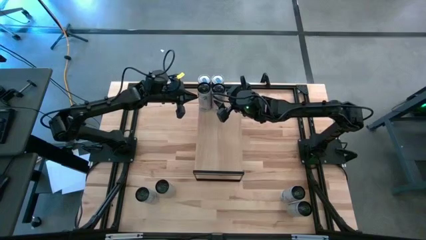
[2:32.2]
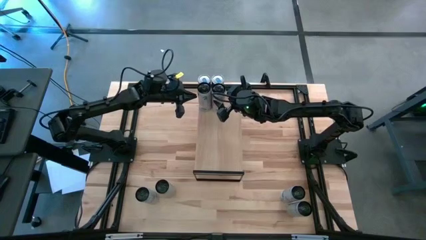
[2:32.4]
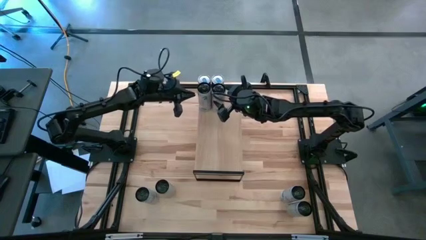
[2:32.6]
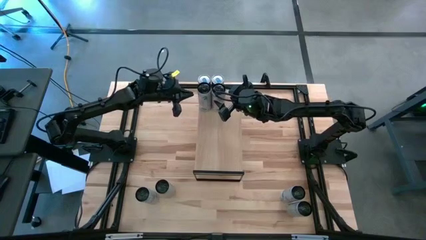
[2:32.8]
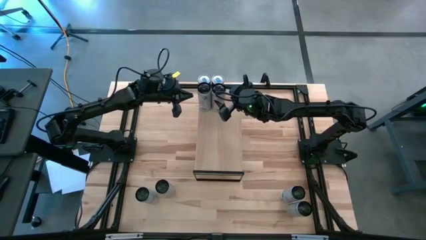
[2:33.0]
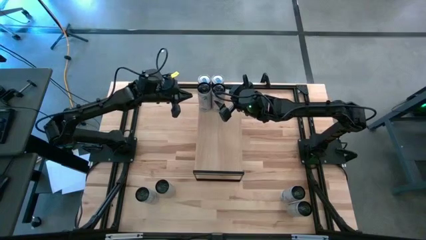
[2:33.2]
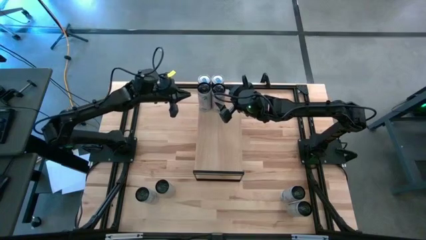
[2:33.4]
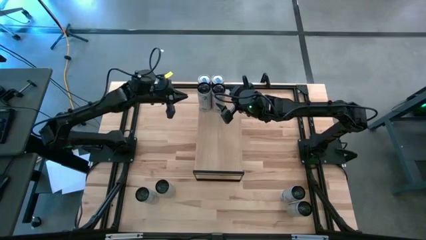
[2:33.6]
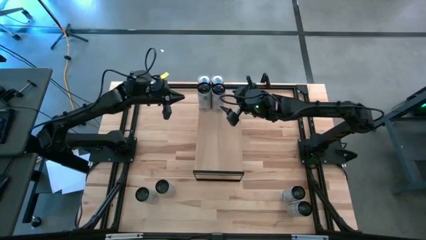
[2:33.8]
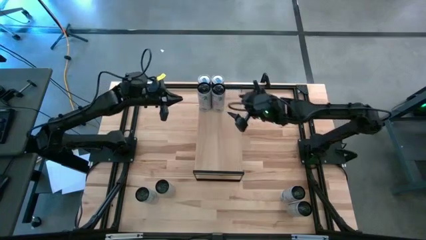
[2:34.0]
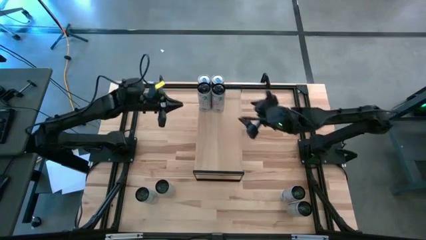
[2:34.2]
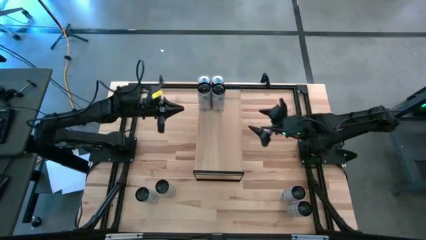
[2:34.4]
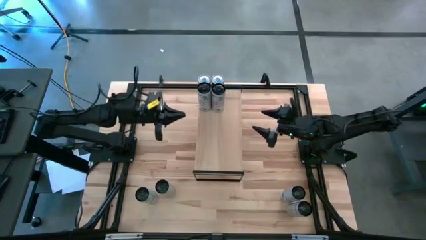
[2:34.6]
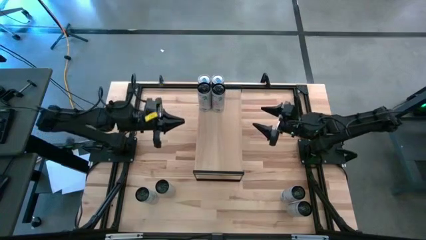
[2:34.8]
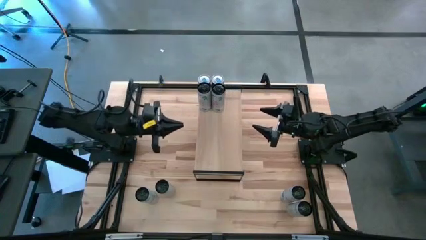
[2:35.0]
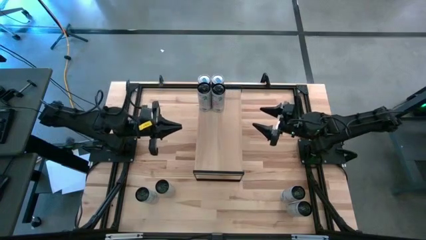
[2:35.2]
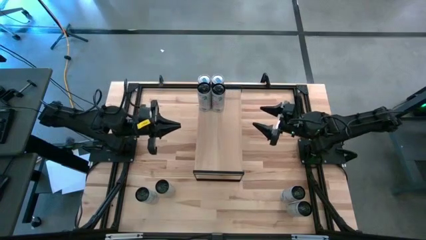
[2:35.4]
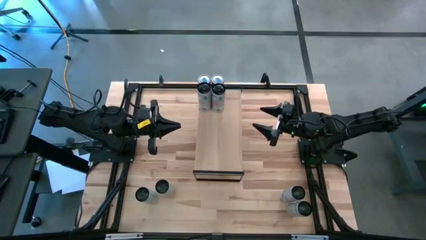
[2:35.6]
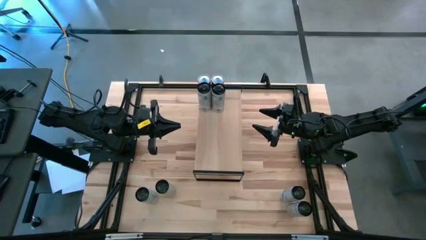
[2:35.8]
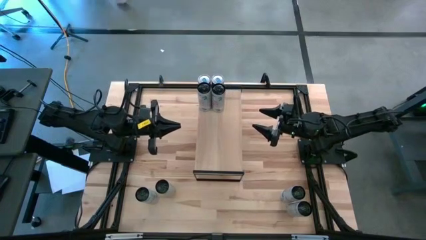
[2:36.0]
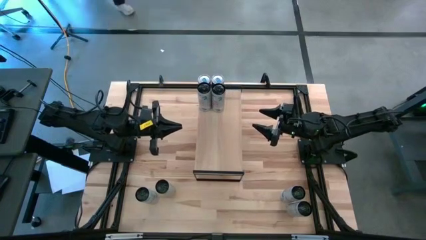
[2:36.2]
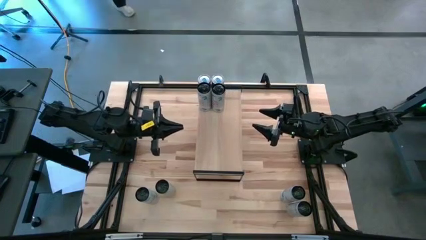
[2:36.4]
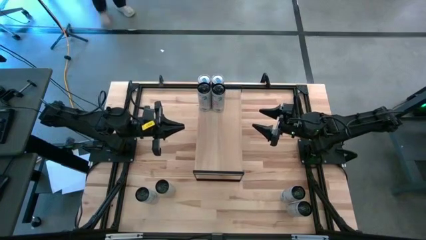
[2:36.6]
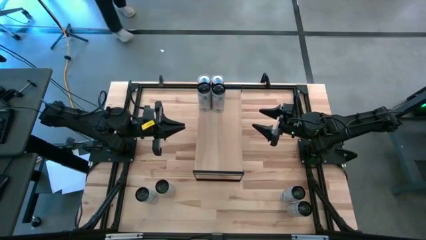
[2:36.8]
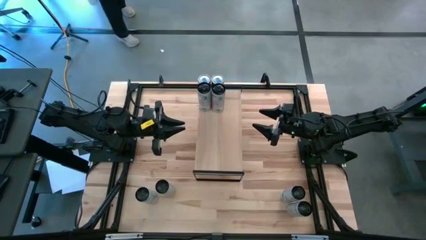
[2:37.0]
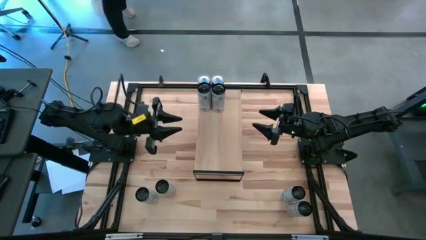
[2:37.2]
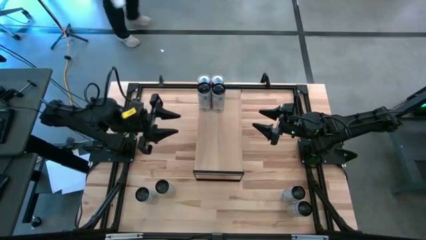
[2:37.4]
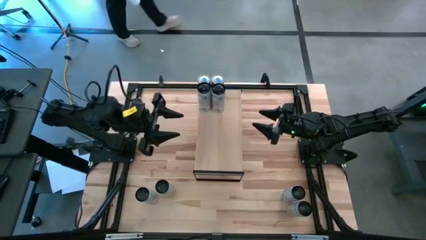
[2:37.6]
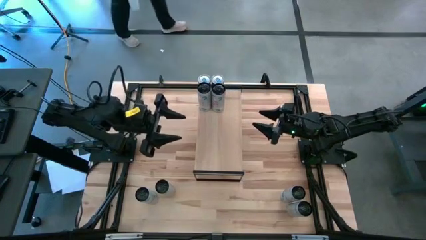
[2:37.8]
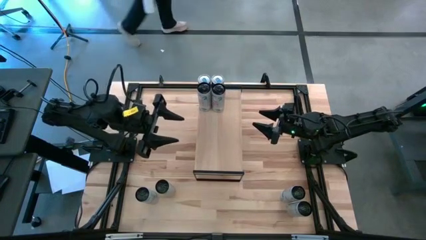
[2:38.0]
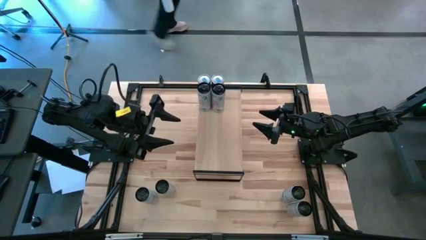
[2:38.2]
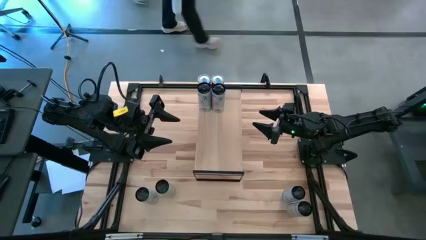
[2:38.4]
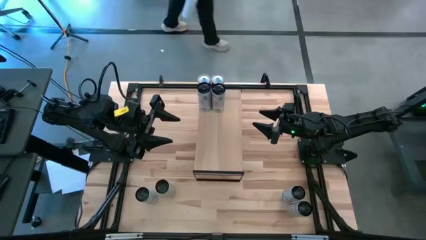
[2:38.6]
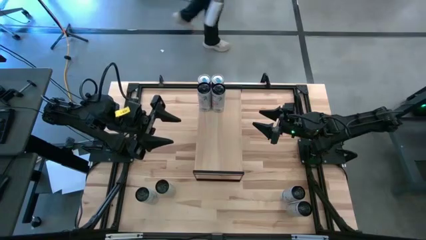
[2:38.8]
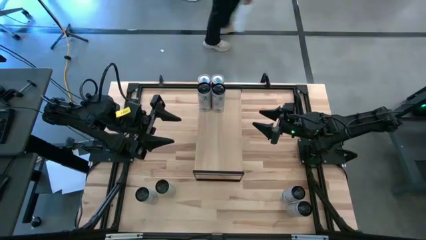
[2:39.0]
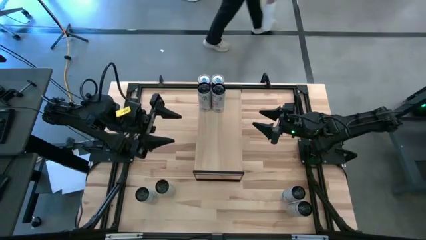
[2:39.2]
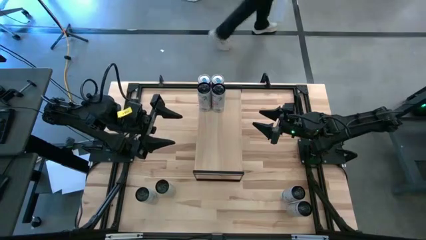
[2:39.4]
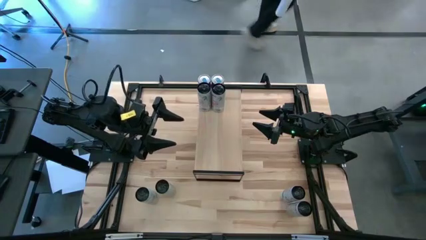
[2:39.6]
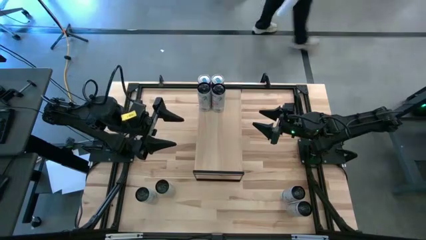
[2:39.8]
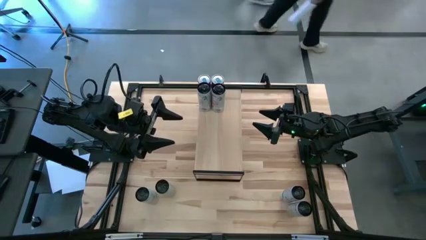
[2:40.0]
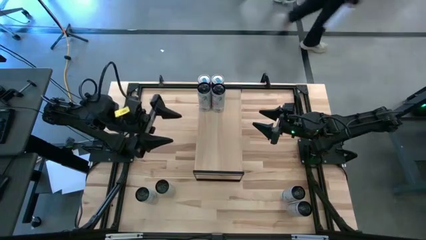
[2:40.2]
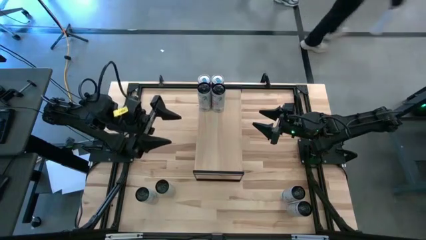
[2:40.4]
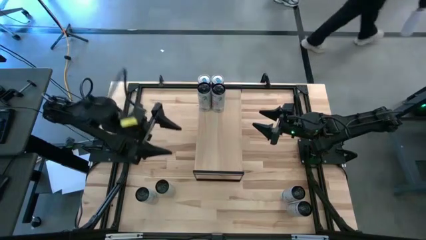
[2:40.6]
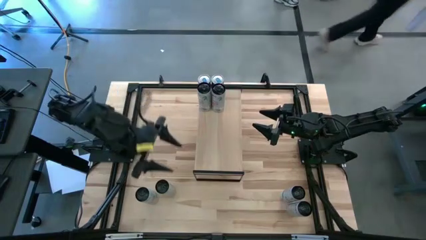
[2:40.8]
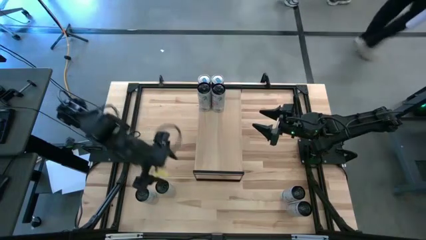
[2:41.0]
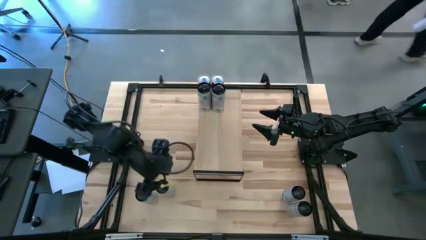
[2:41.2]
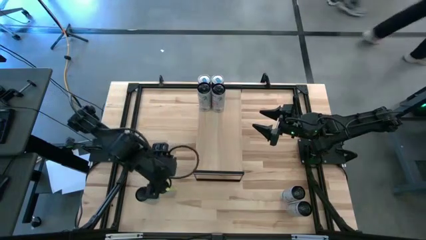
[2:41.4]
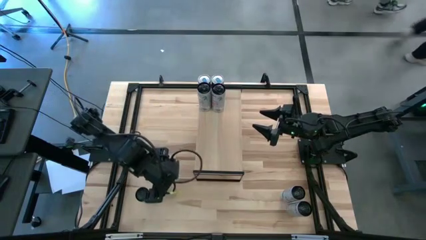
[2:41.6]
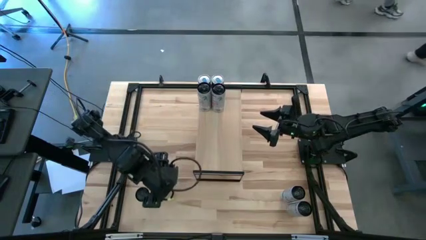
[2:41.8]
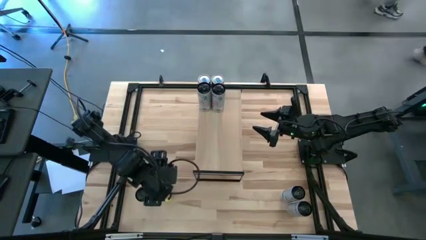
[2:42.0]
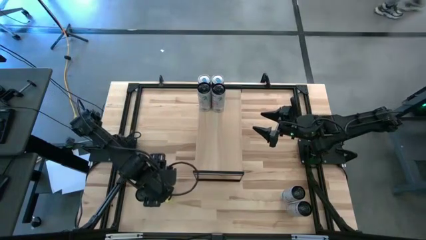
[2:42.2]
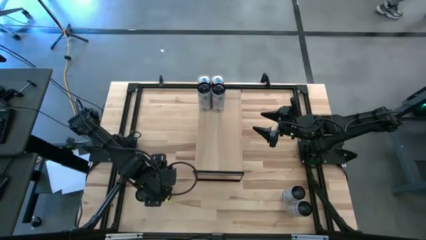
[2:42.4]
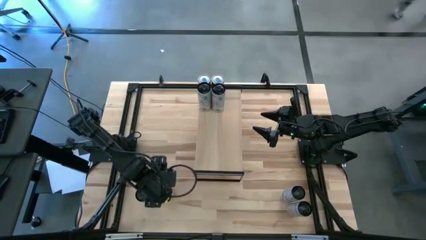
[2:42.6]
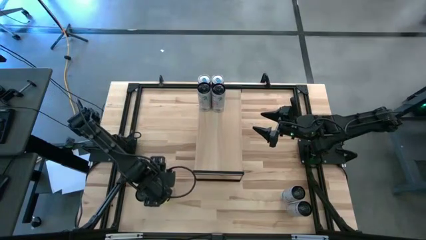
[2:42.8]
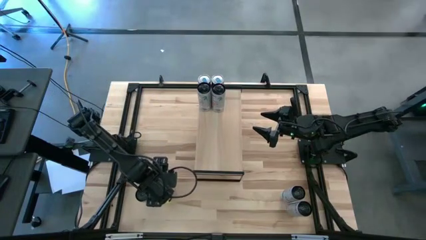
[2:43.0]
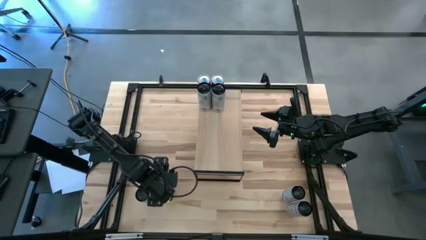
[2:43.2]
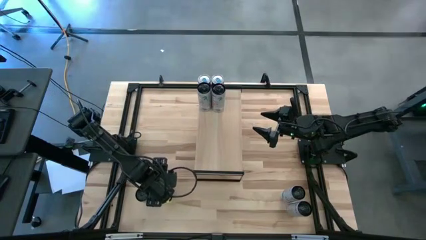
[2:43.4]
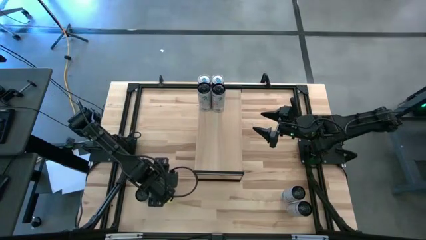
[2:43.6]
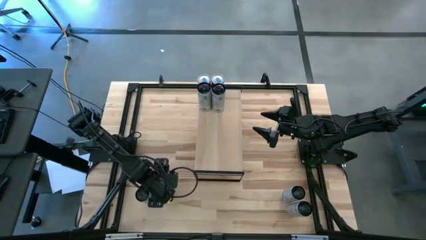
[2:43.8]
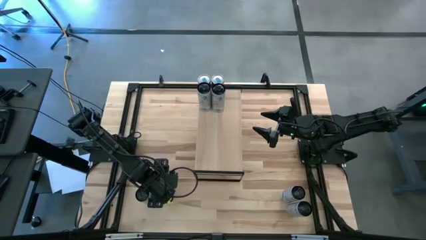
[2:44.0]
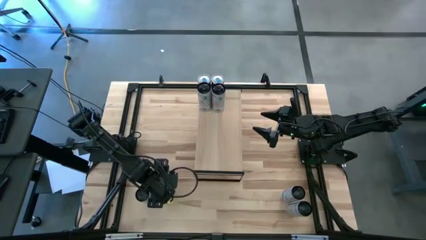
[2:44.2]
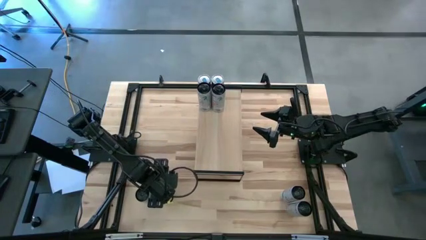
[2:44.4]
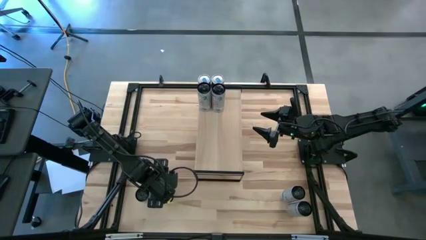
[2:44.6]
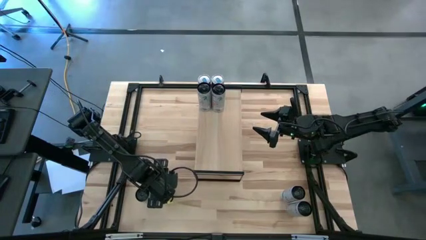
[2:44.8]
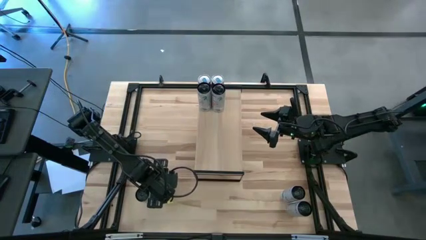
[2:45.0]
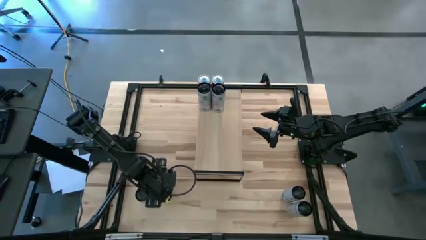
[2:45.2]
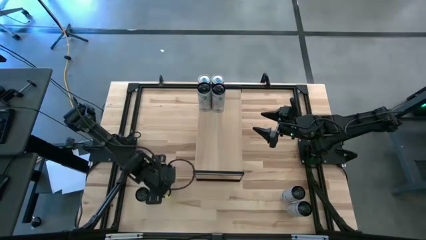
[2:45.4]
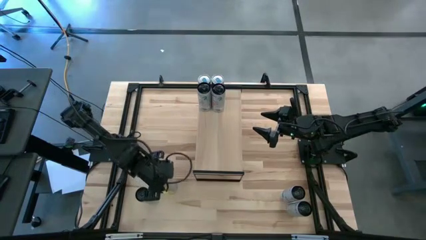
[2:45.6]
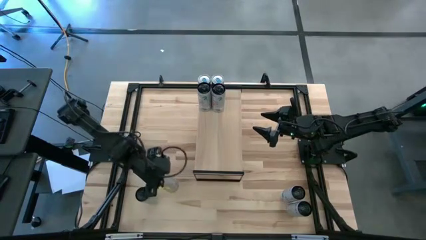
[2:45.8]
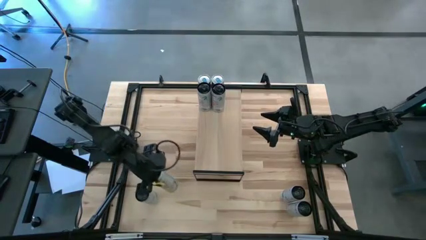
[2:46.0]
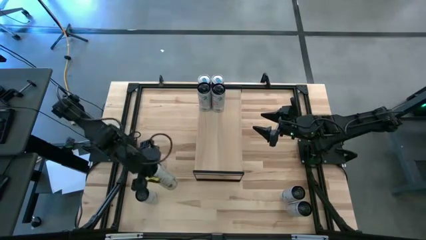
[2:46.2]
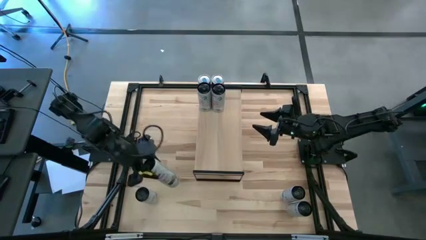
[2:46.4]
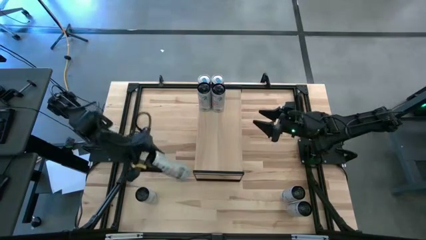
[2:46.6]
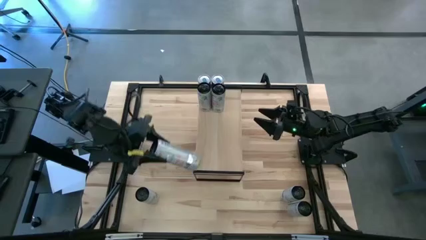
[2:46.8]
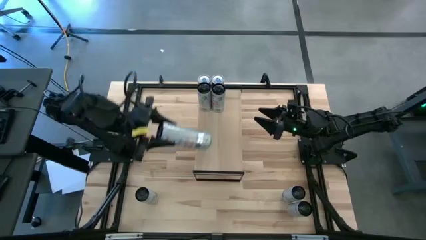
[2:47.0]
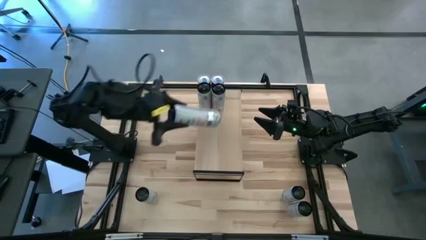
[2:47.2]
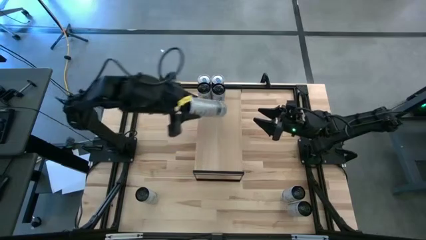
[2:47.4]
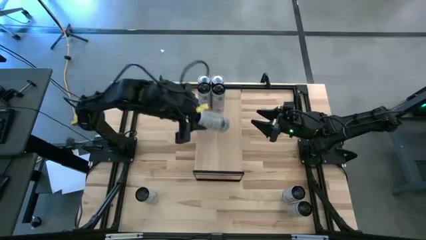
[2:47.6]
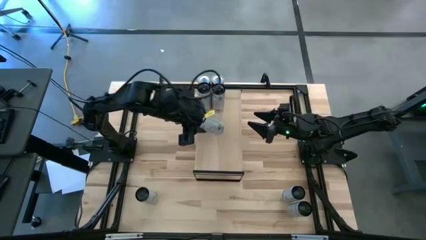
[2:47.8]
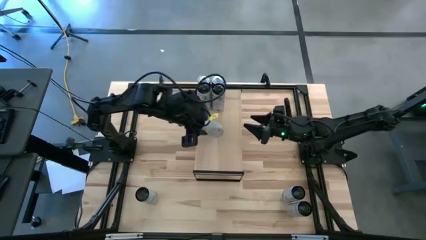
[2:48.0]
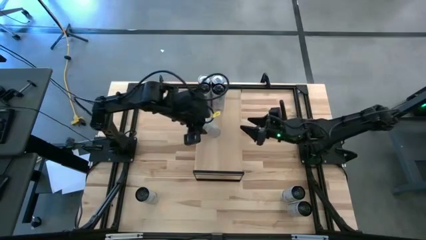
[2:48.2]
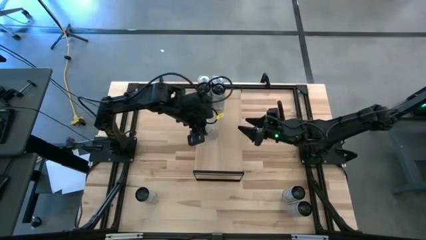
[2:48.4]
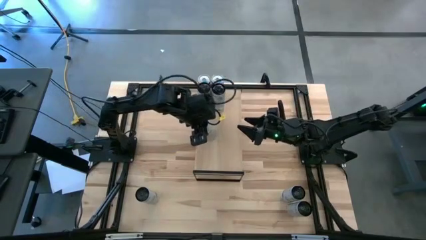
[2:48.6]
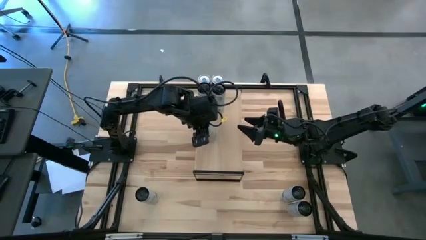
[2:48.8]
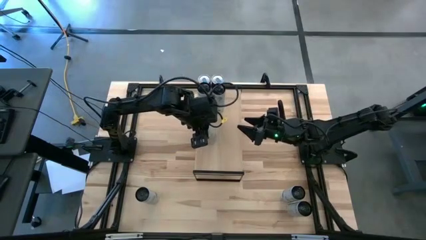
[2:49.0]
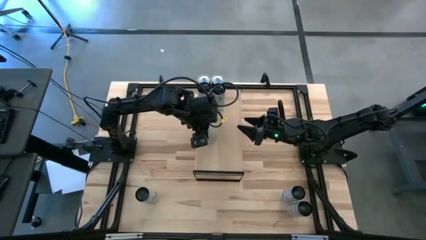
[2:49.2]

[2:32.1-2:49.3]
Task: Place canned beverage on shelf
Put the left white yellow soda can on the shelf
